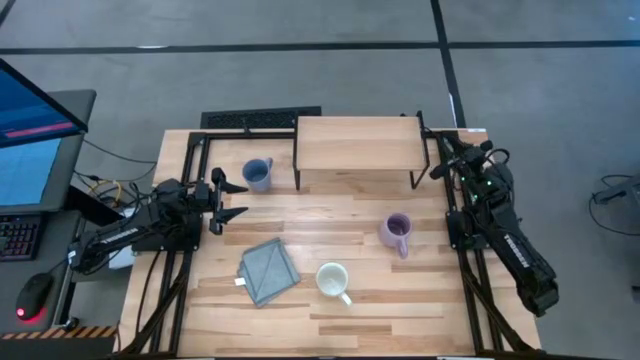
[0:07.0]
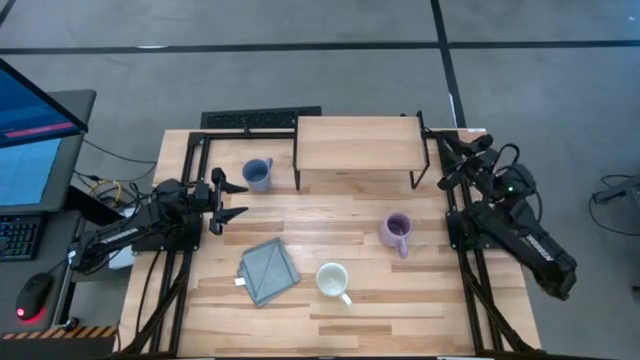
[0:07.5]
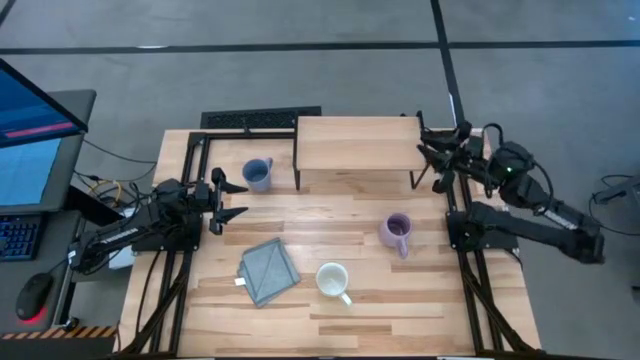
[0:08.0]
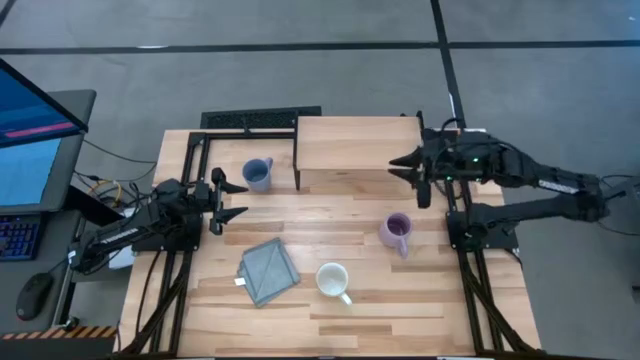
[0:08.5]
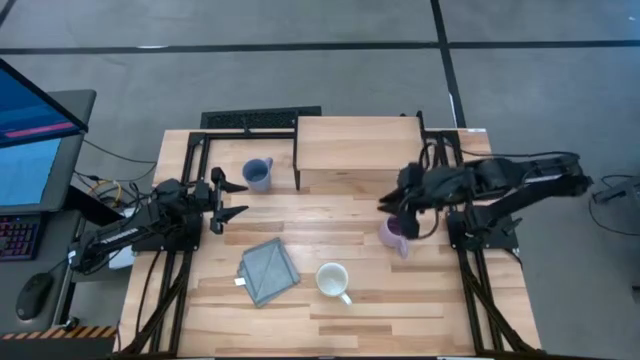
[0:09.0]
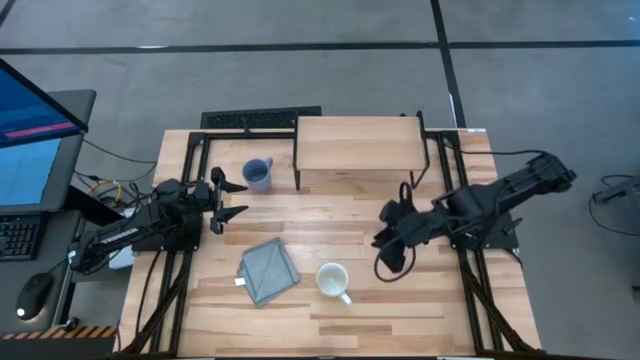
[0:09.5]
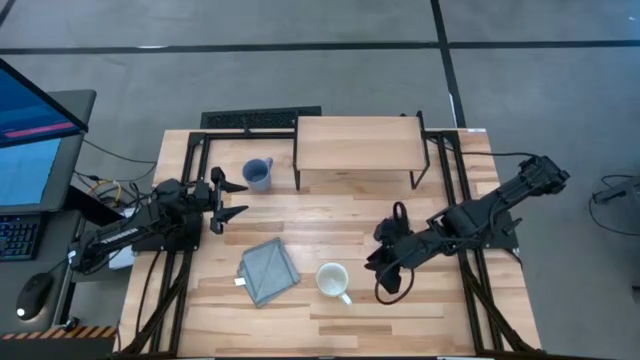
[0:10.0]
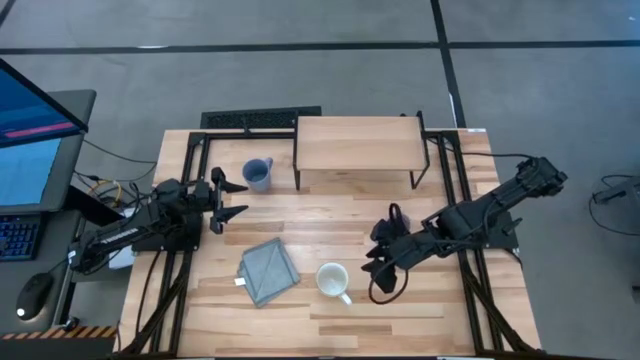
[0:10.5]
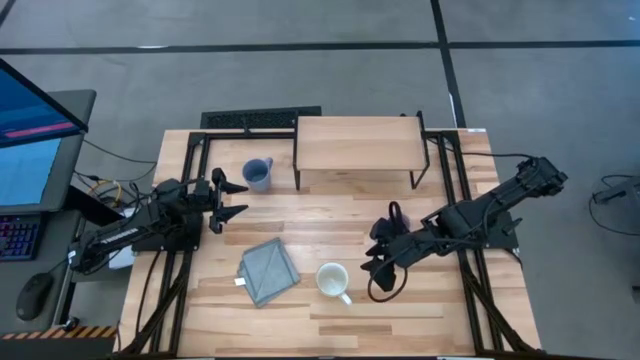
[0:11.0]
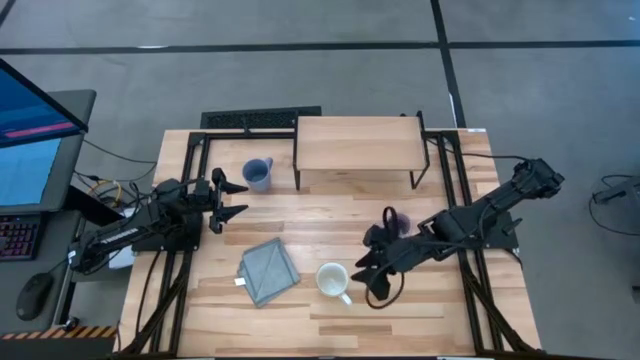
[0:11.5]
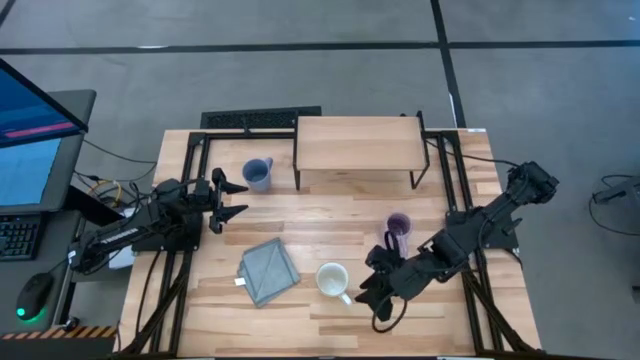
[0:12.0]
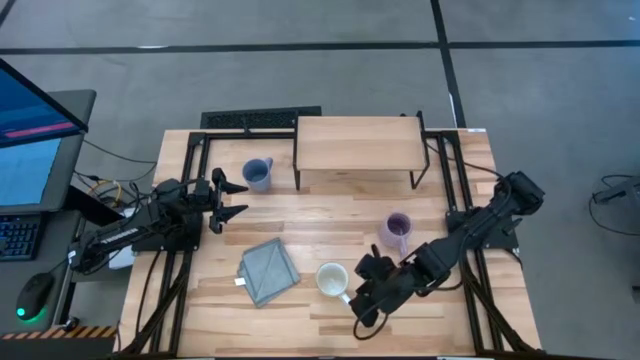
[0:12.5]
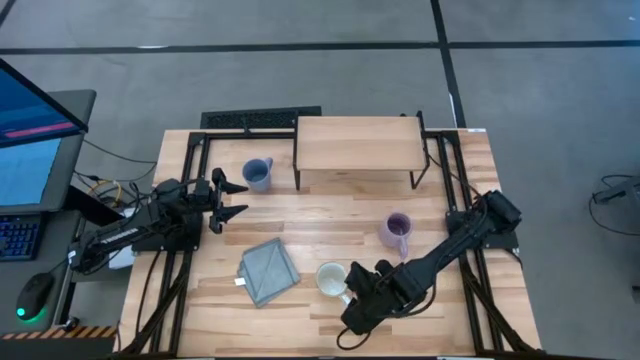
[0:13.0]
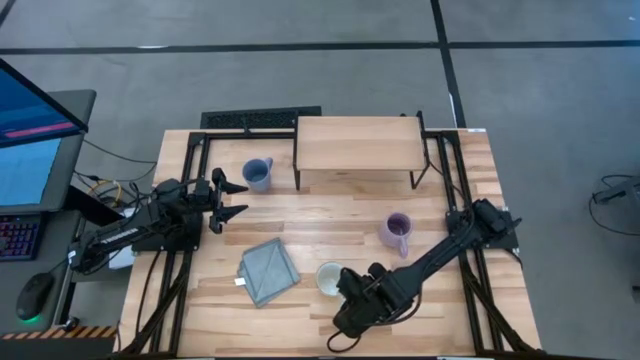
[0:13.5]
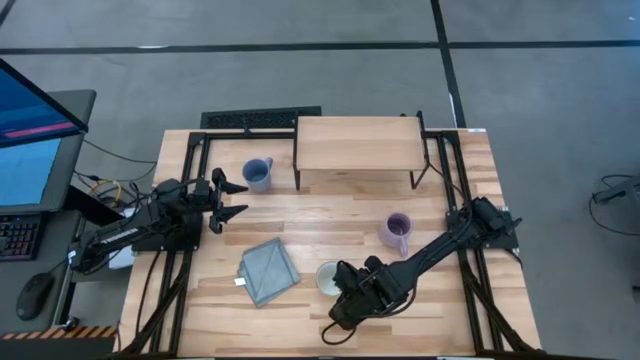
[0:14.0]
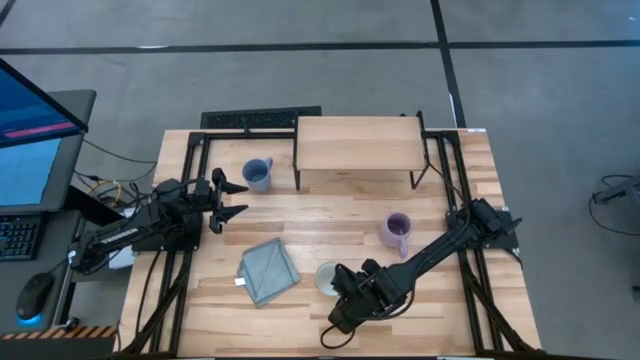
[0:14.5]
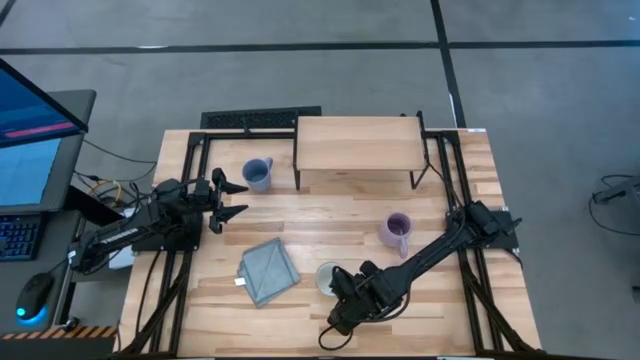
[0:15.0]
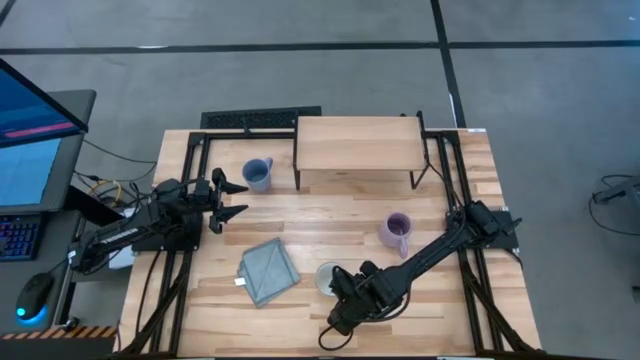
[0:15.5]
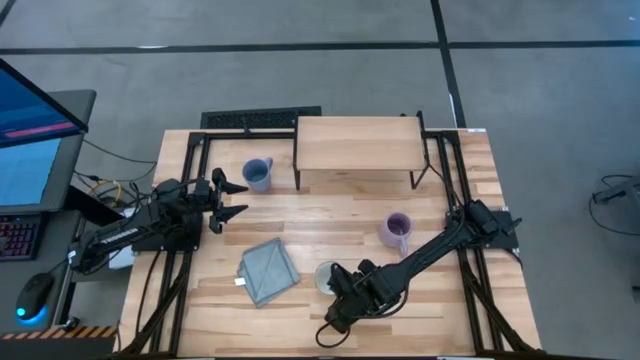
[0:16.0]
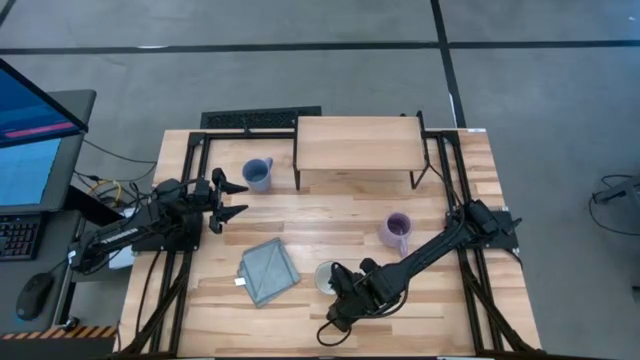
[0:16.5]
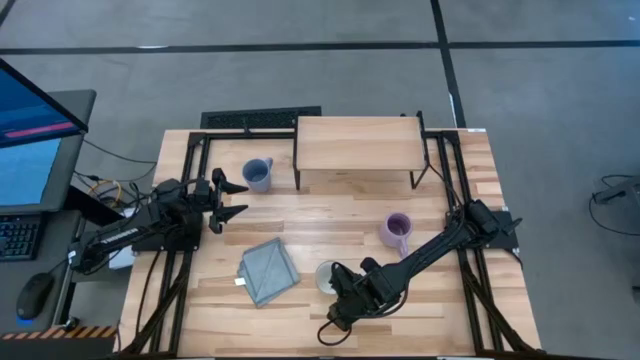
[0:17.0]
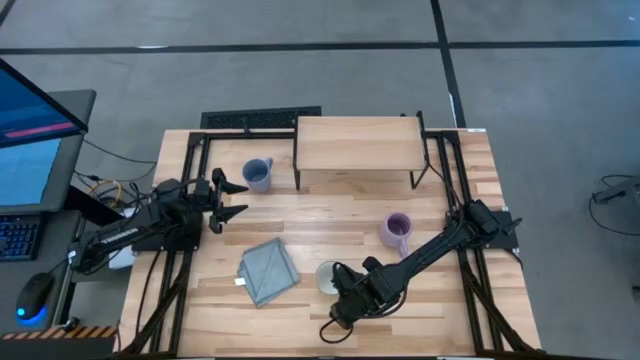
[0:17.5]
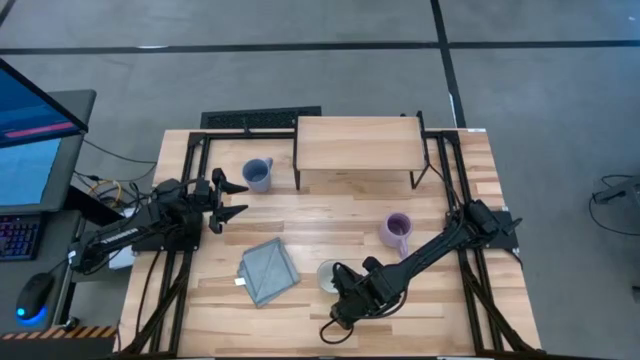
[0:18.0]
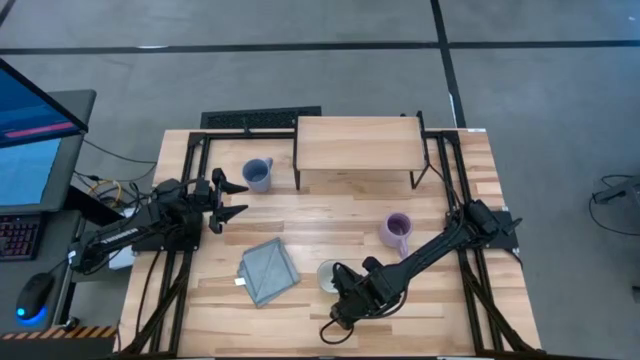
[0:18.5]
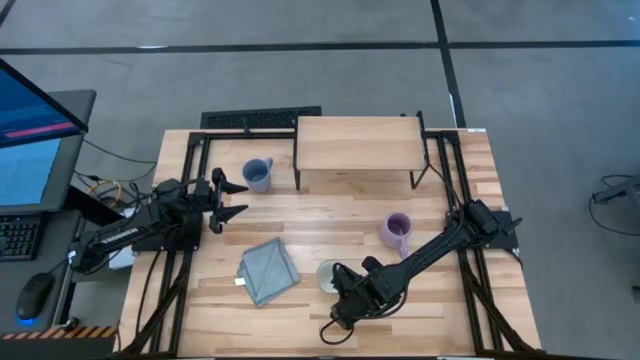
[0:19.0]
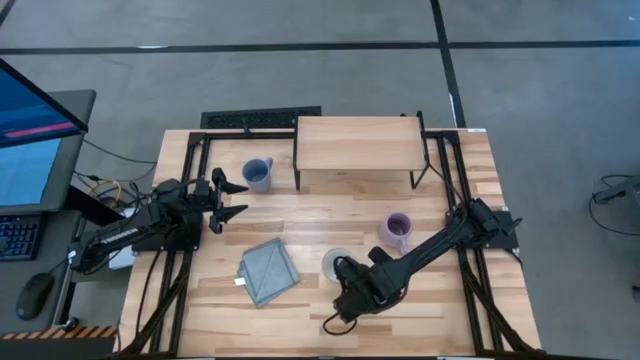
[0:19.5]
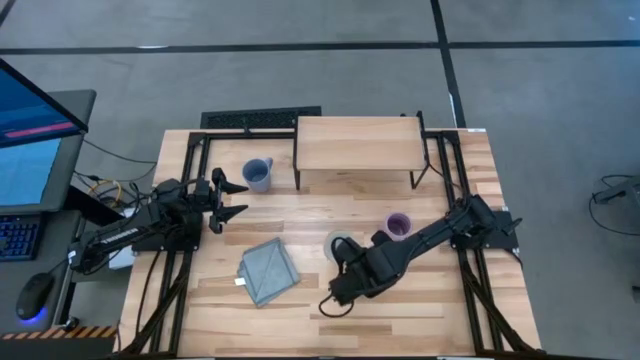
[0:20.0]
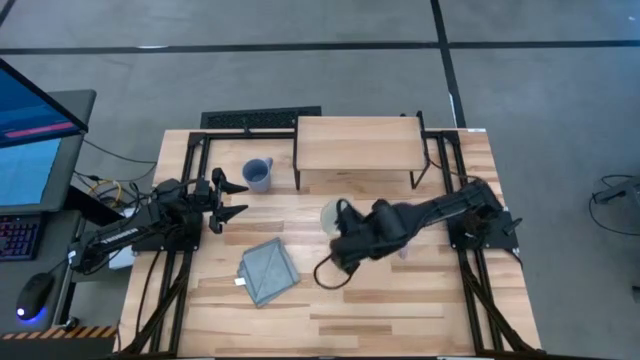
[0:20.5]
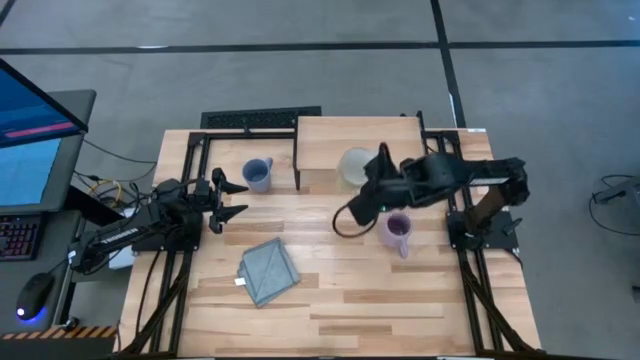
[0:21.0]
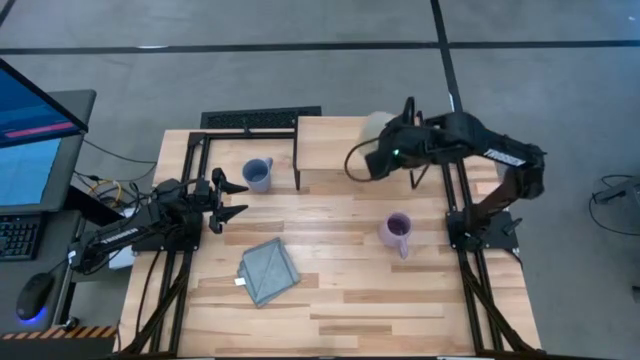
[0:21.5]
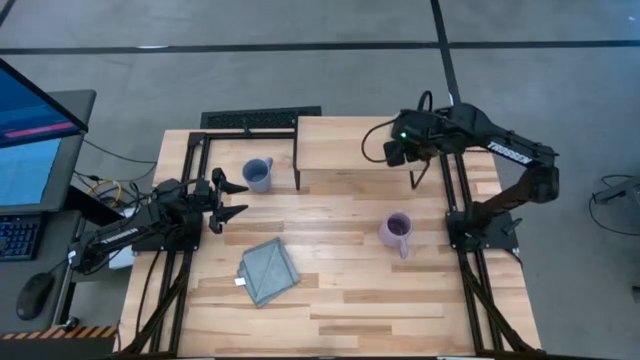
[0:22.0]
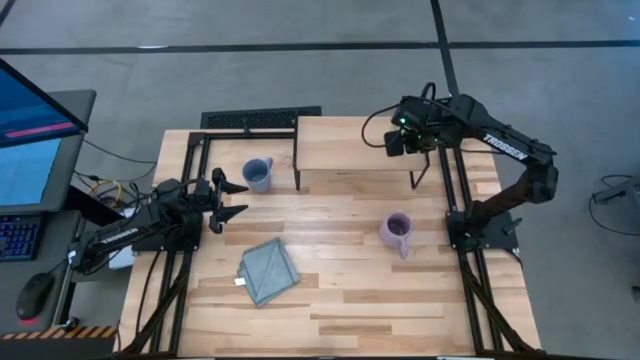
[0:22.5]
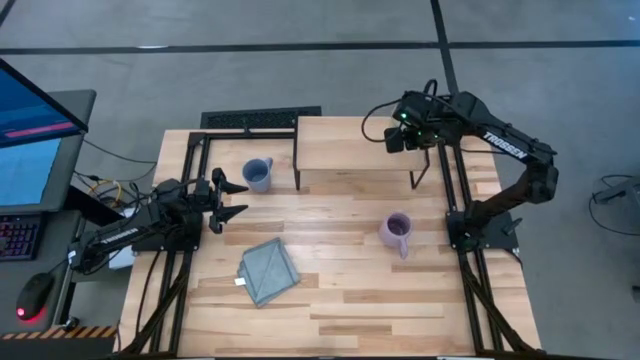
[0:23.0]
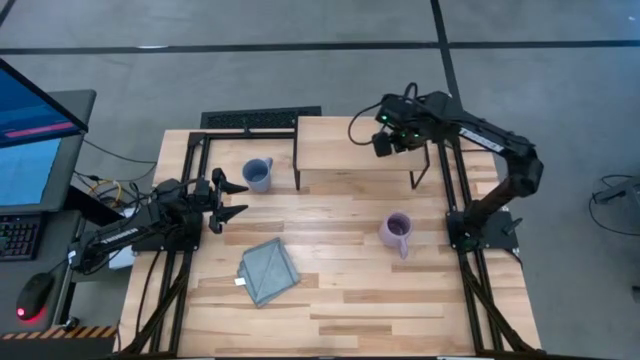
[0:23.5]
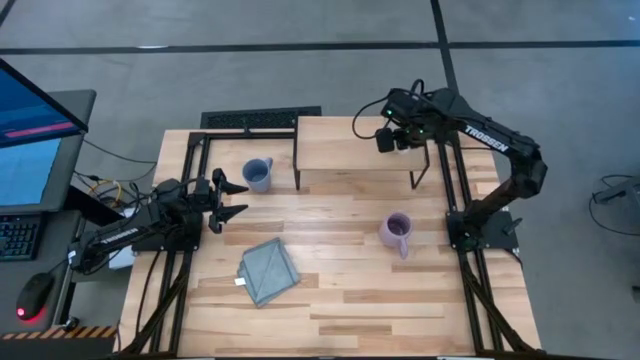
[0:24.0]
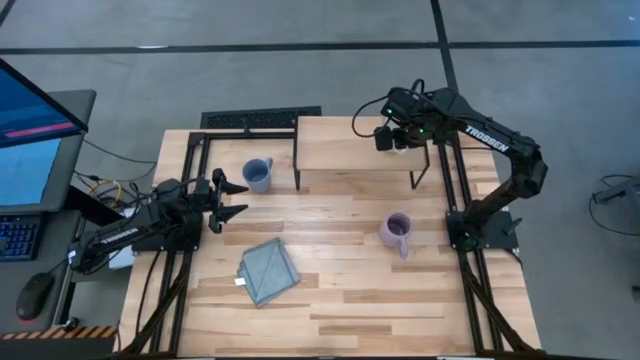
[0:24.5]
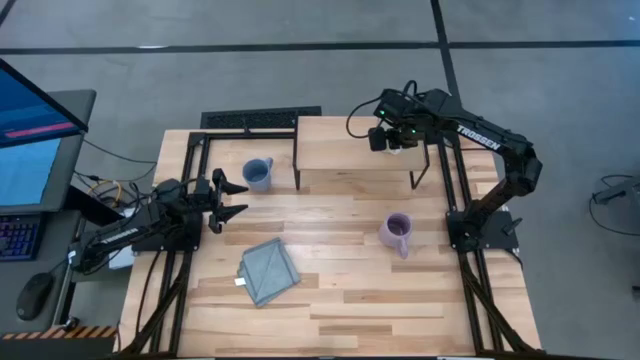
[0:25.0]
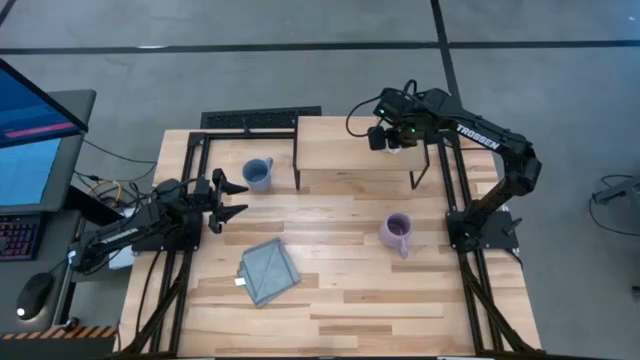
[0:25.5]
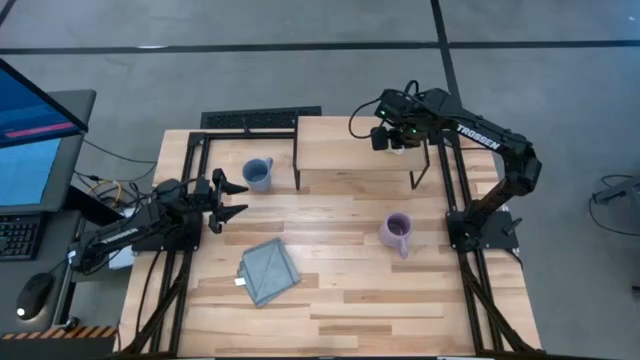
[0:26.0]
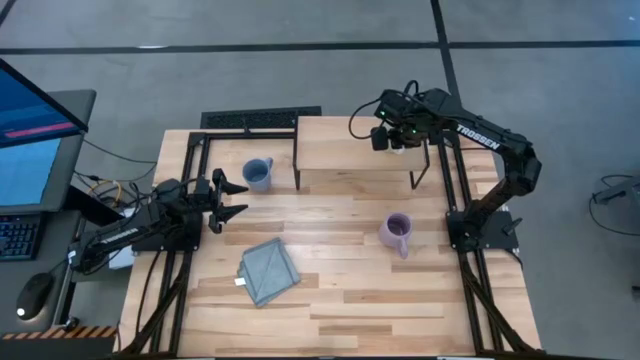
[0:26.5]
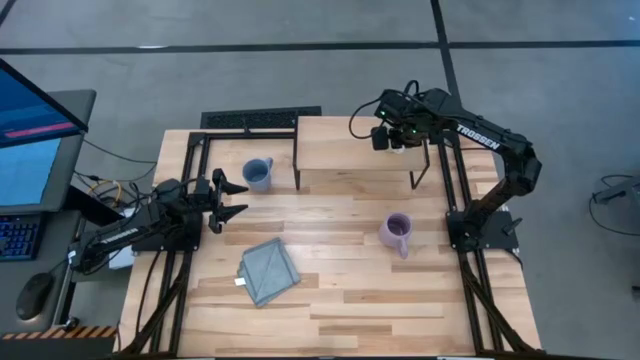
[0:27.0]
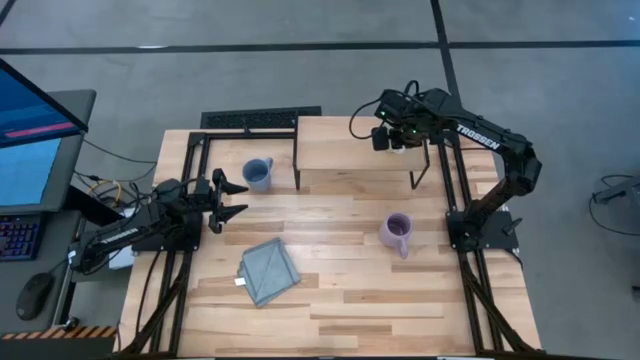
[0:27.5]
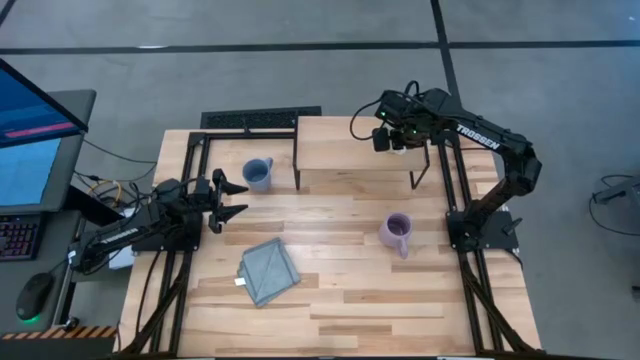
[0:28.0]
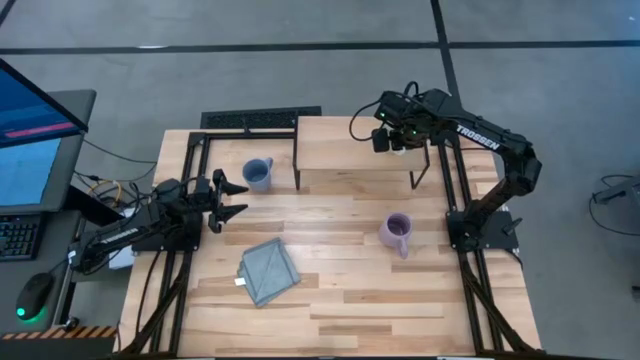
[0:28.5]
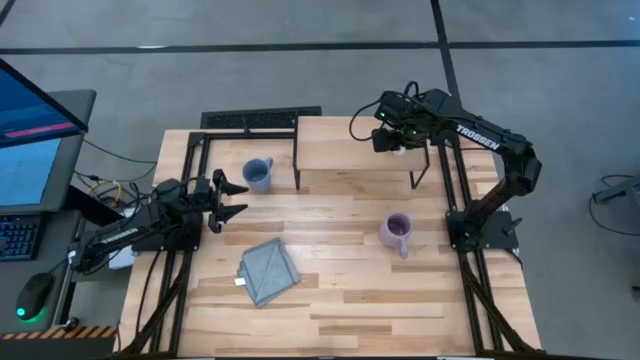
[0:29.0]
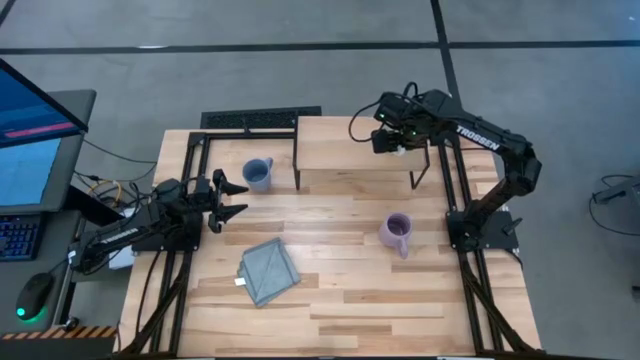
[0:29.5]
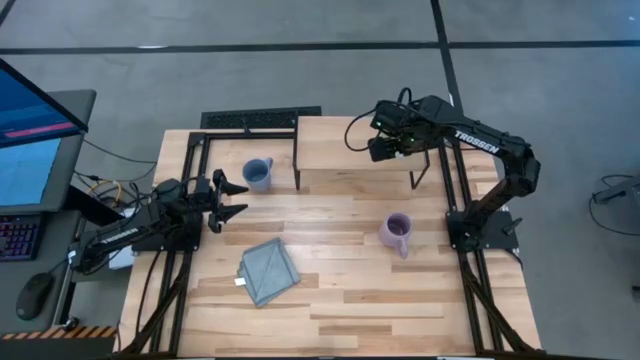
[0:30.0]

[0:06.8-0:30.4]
Task: Stack small to large cups/mugs on shelf
Put the green mug on the shelf
